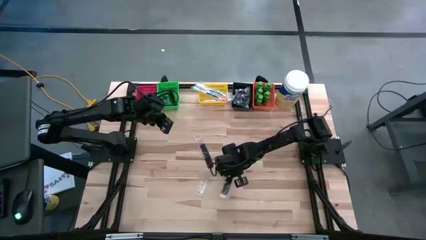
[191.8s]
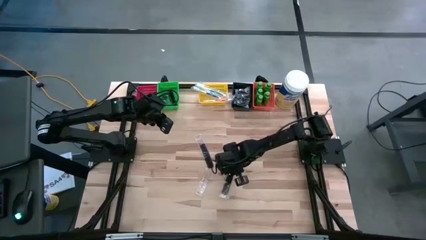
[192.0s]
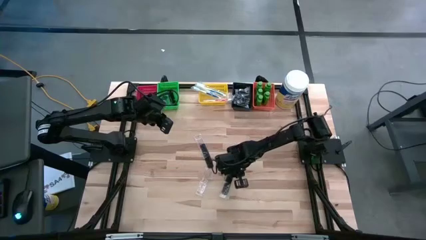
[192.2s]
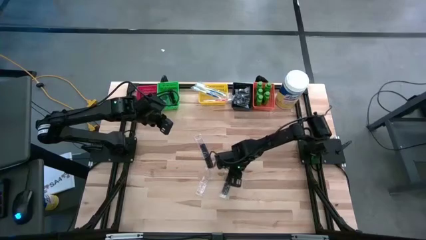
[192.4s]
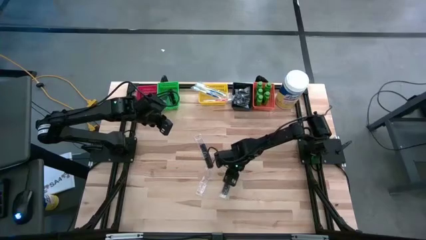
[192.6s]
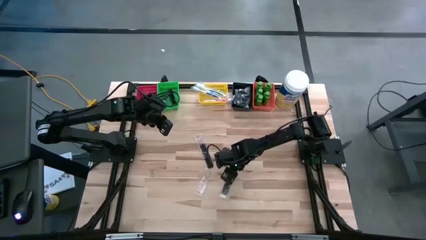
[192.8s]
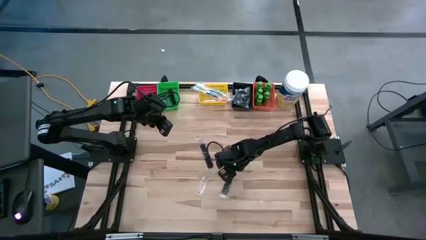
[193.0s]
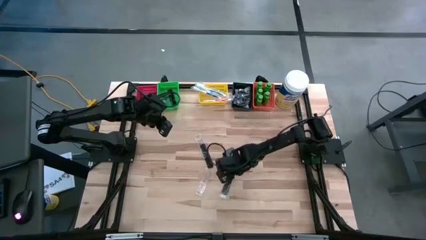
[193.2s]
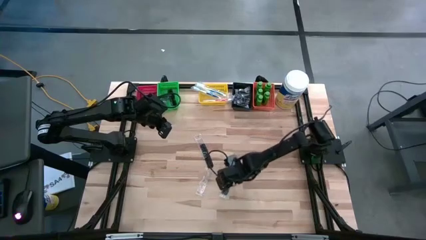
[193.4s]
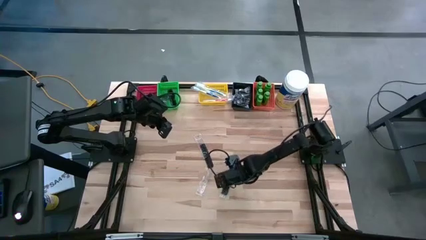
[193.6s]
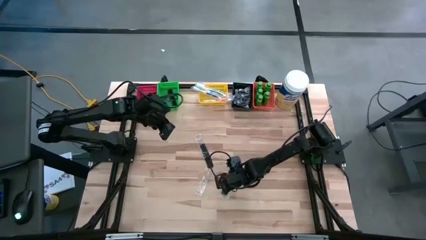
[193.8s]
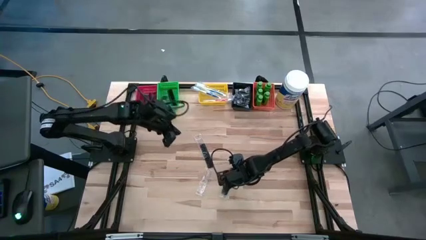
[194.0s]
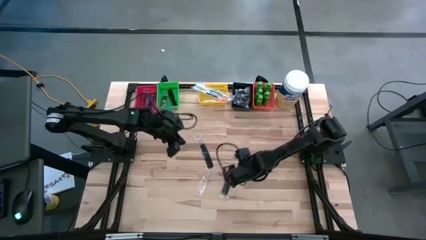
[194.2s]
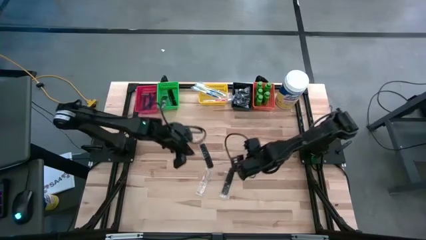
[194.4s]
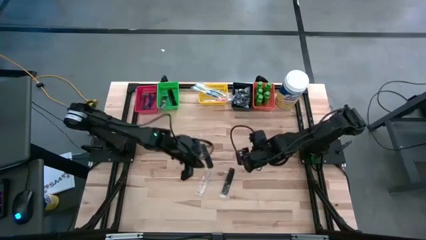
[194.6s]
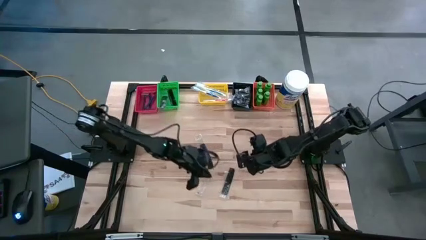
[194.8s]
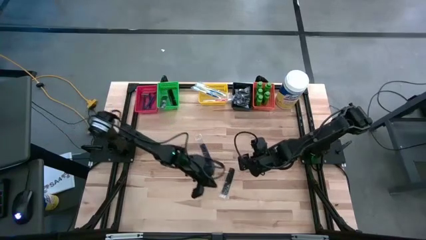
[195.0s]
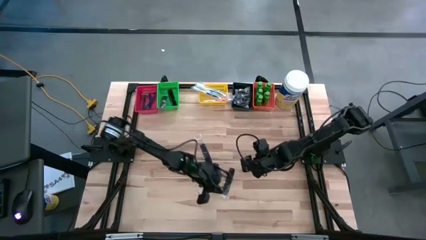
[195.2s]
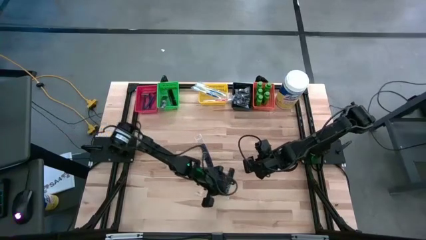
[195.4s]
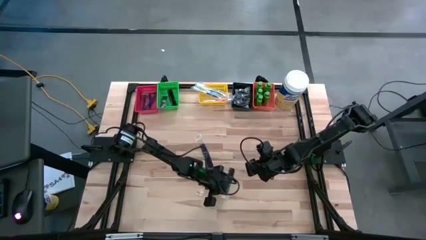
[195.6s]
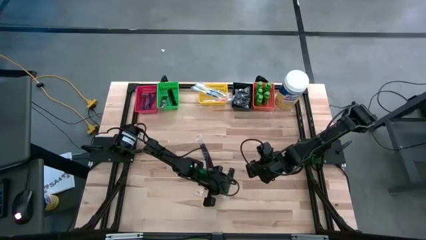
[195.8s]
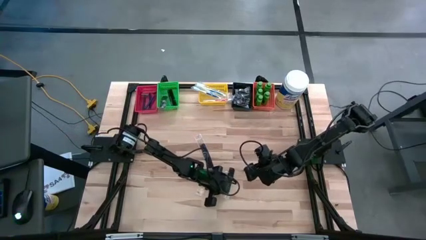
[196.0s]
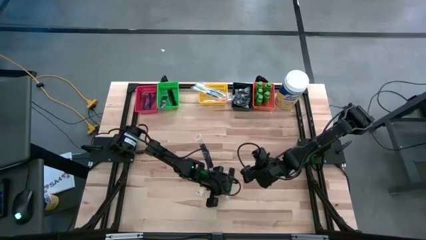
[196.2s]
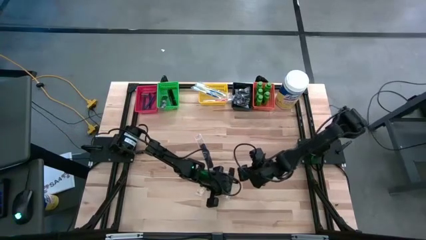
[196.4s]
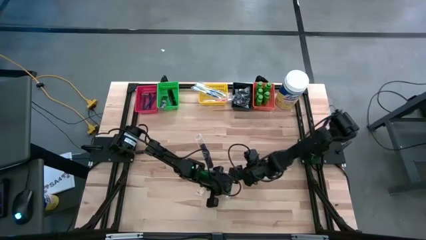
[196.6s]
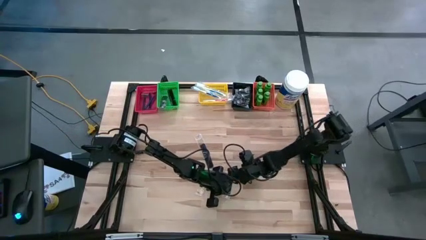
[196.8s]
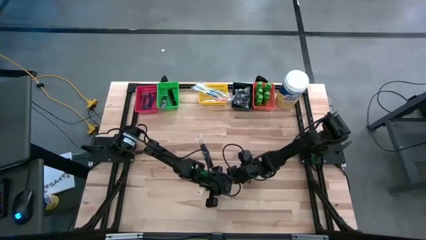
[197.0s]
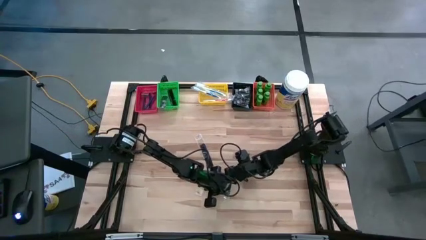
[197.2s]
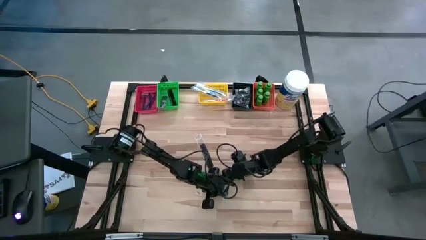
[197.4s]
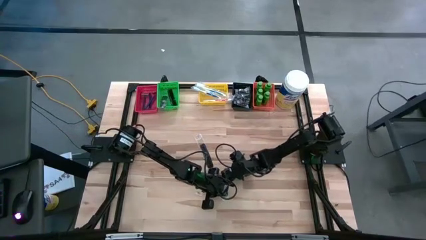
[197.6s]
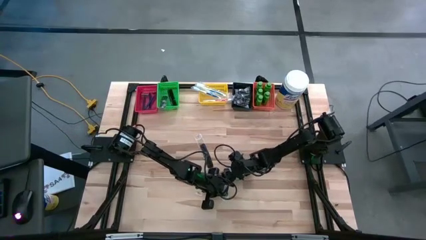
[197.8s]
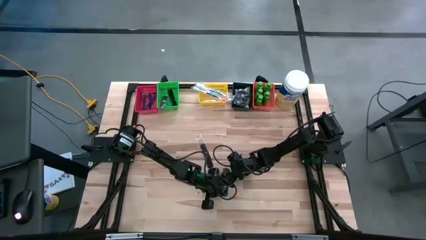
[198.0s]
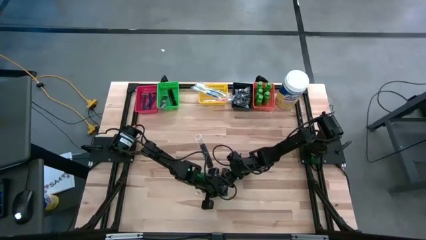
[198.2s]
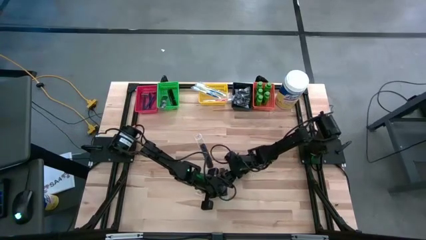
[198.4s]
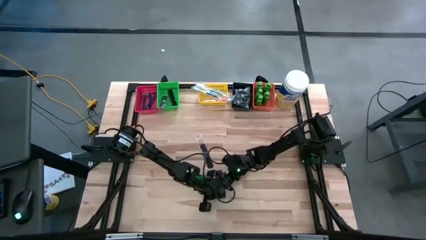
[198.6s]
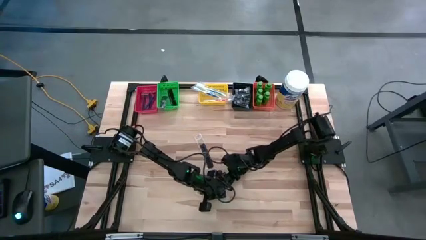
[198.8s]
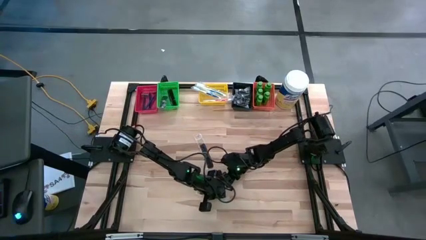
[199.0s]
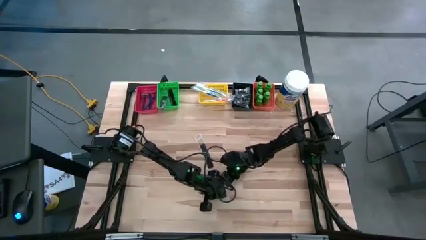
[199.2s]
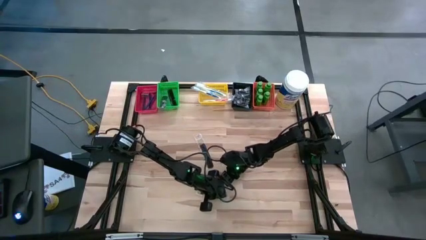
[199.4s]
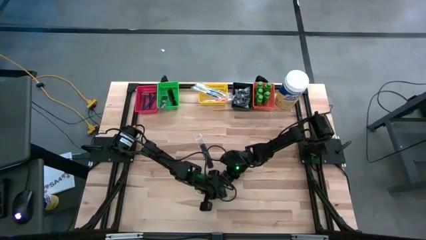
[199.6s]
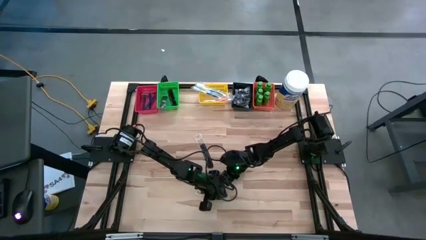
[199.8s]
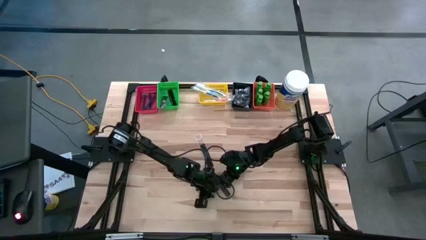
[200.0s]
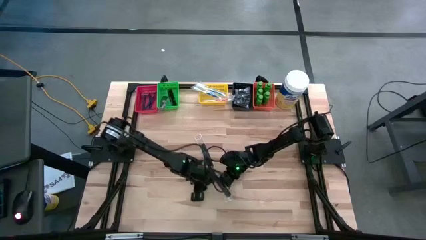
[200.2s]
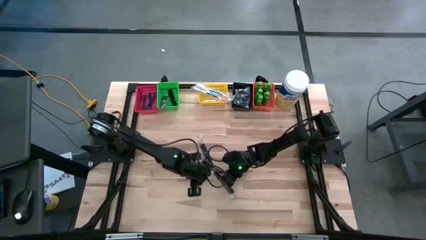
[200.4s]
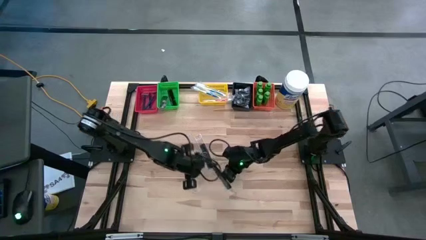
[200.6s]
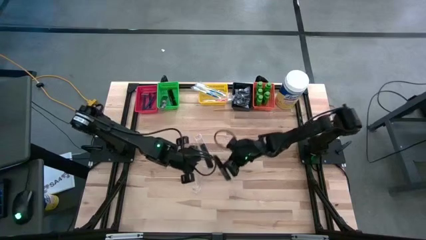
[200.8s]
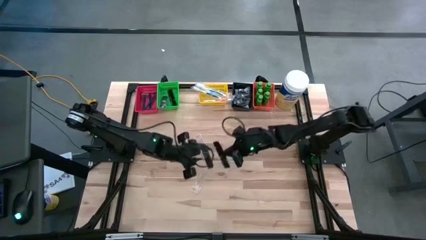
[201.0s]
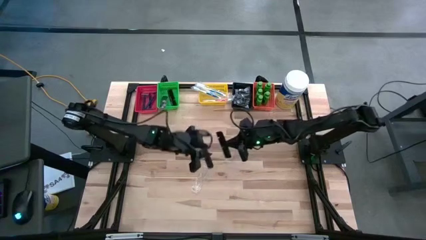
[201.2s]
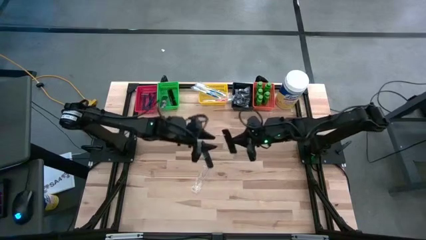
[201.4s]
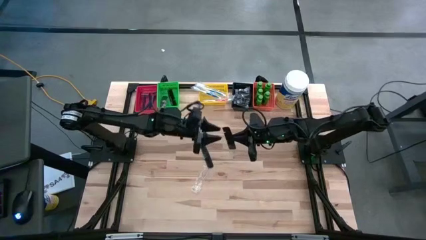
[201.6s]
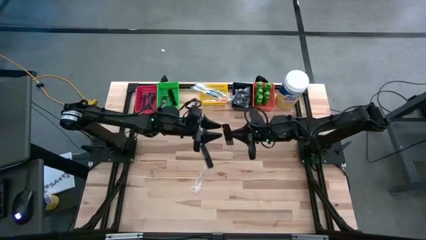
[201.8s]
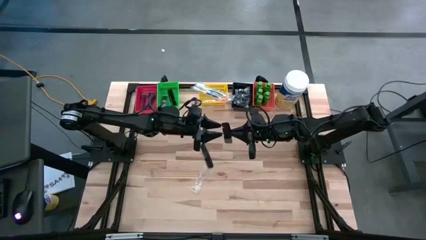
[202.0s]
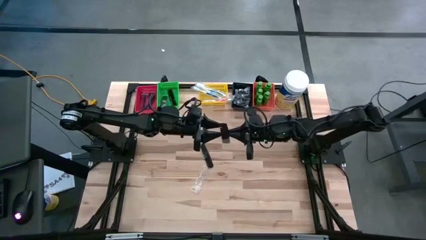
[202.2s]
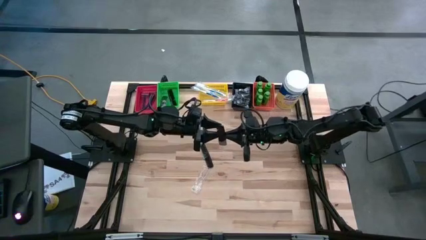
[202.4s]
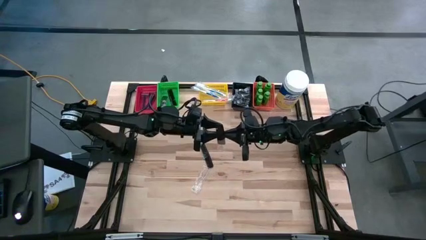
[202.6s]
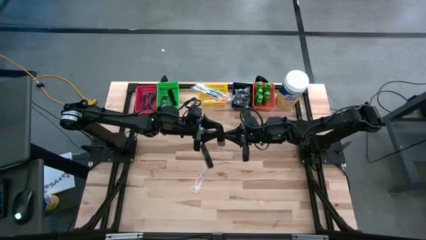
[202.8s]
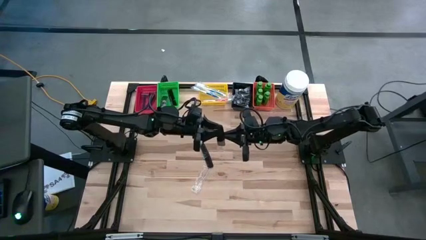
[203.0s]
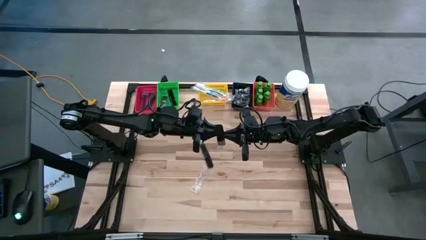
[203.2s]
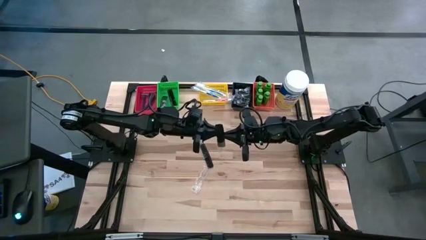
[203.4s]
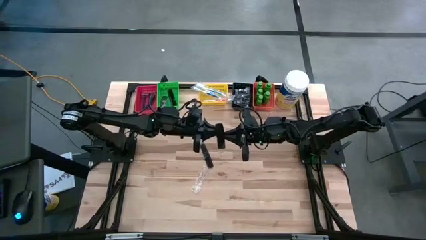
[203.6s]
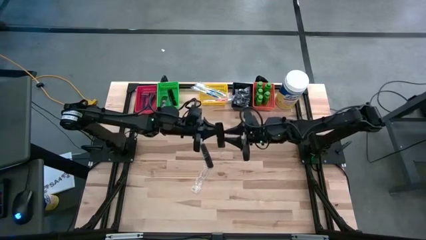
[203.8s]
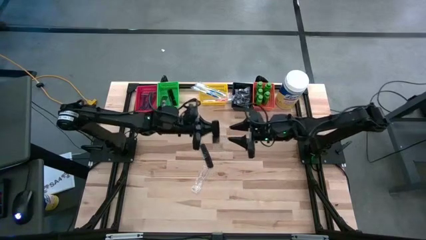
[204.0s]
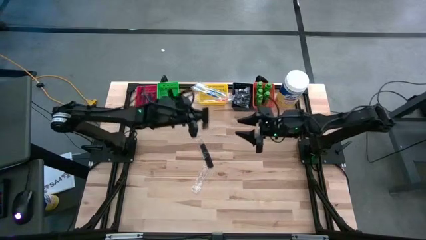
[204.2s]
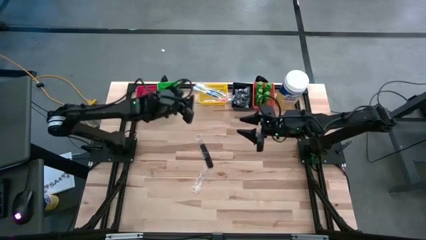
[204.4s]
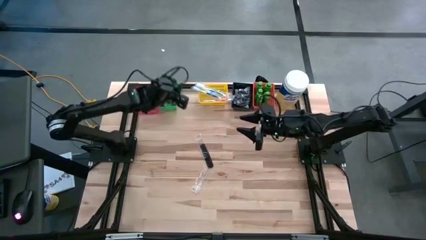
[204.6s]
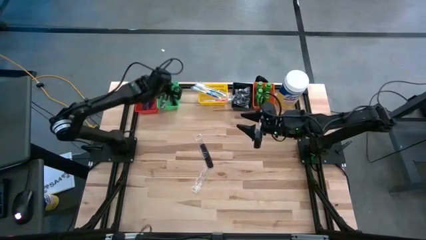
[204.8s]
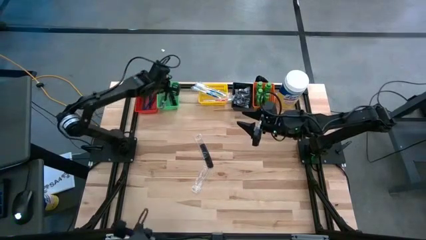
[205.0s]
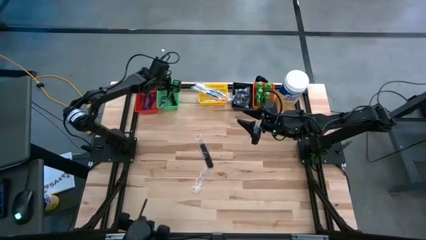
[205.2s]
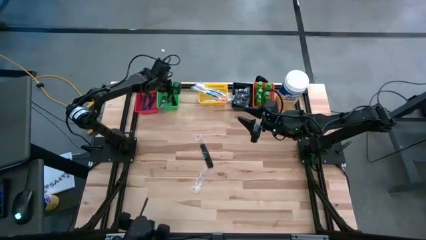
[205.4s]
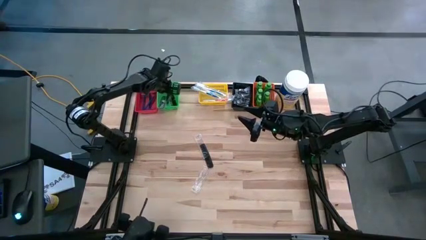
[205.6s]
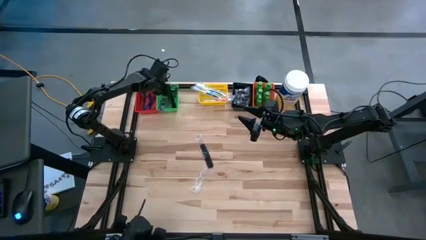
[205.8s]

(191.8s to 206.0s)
Task: Pick & Place Travel size toiletries
Put the black comb into the green bin

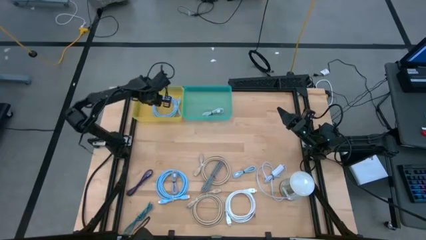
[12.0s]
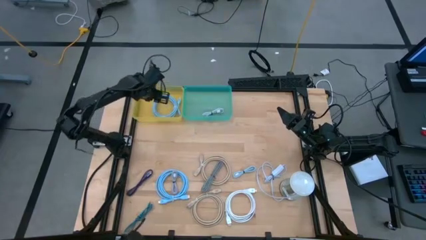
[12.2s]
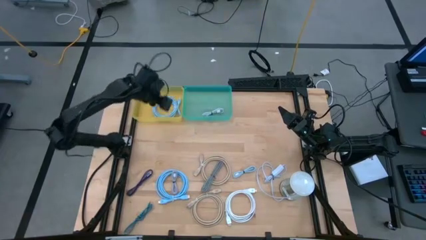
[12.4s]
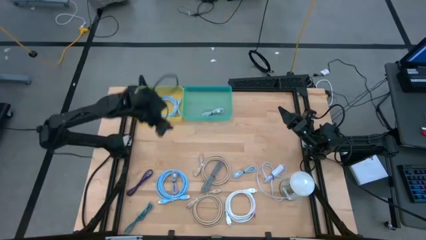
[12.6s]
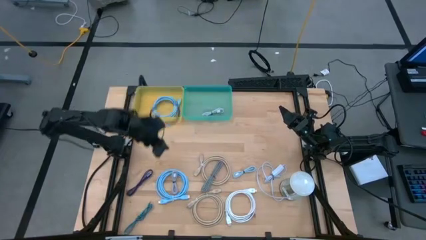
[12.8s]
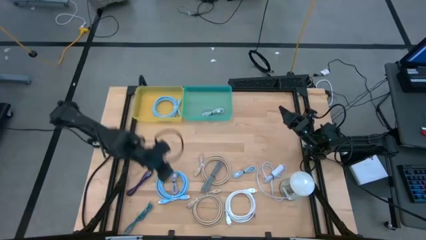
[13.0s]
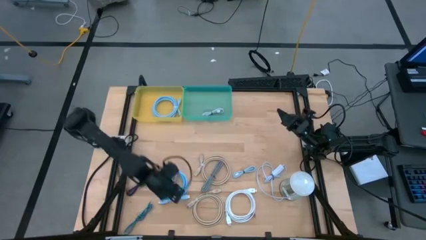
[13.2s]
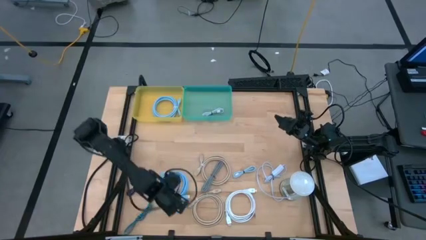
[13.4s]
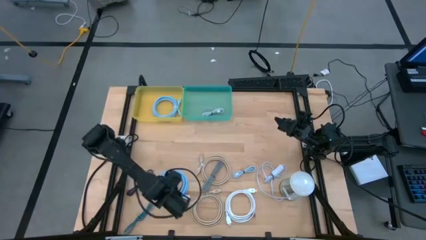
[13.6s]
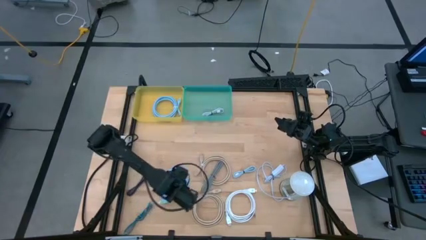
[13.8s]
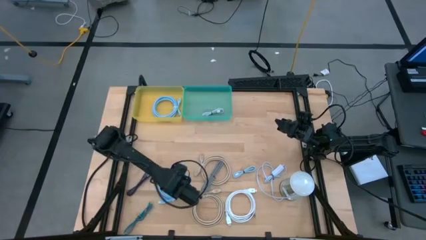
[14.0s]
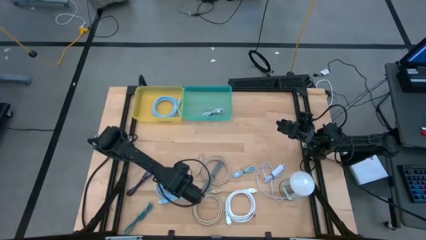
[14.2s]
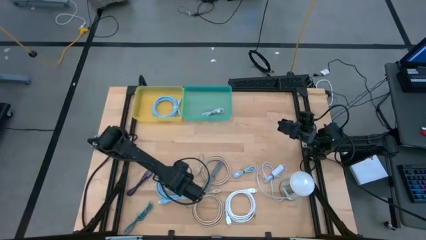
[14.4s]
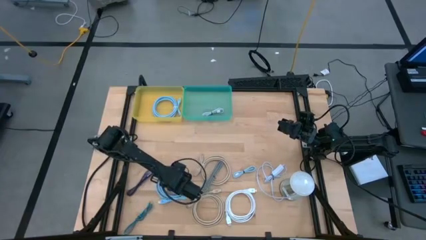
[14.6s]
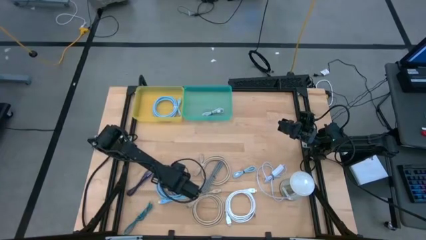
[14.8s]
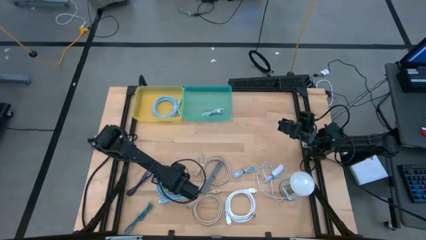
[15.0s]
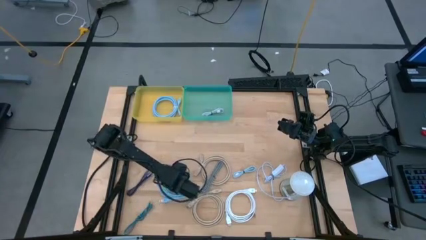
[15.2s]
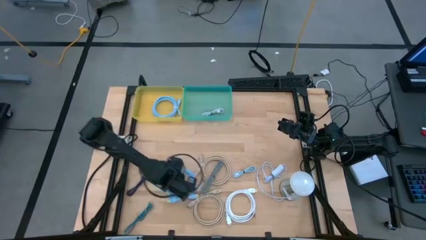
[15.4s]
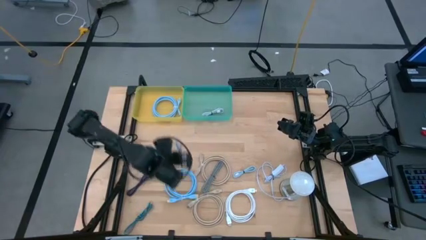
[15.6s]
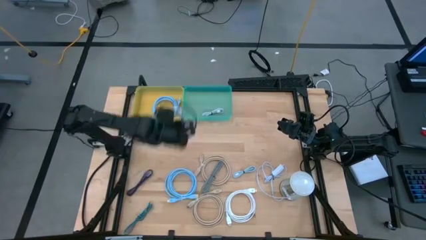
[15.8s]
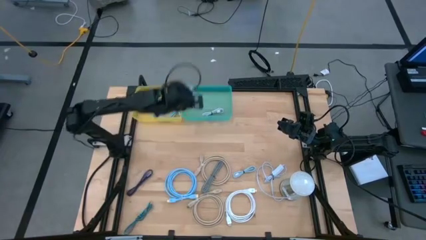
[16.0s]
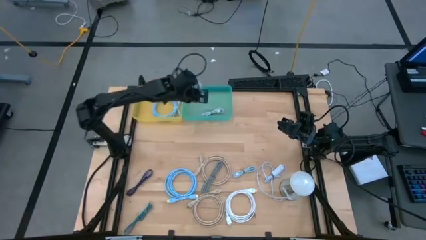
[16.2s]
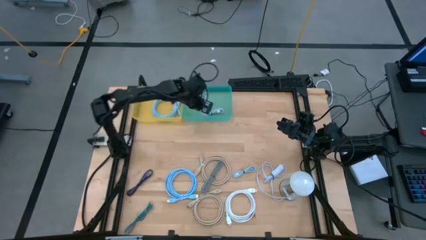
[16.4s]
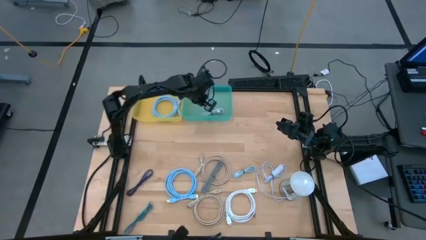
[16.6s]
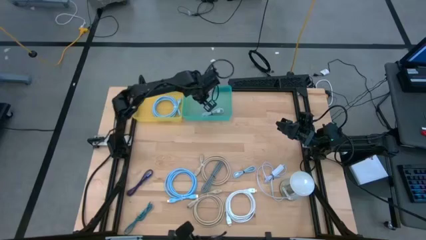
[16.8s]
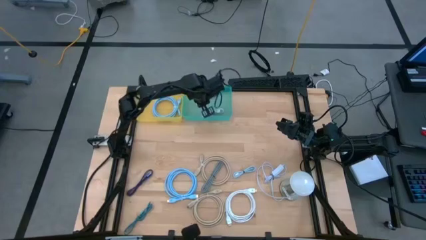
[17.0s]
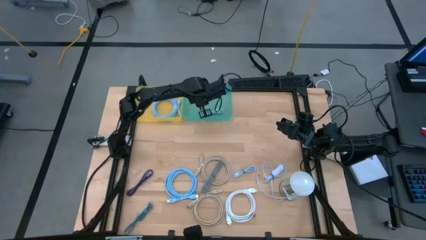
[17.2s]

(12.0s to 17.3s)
Task: Pick & Place USB Port
Put the white charger cable into the green bin
